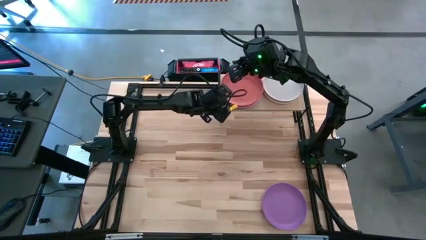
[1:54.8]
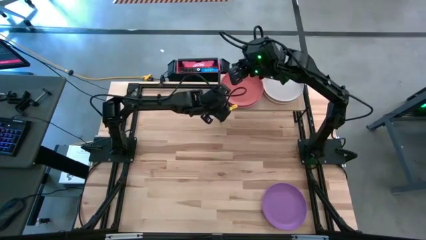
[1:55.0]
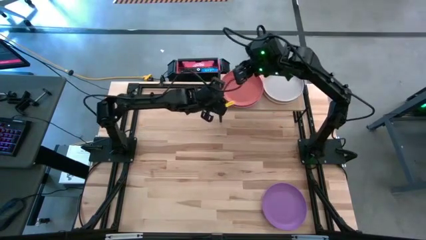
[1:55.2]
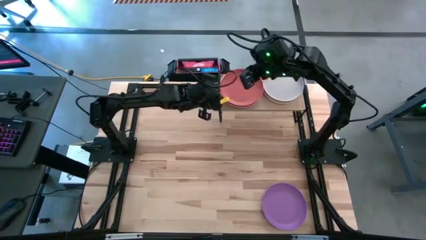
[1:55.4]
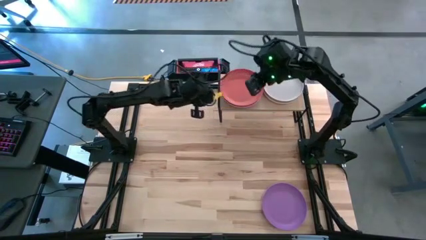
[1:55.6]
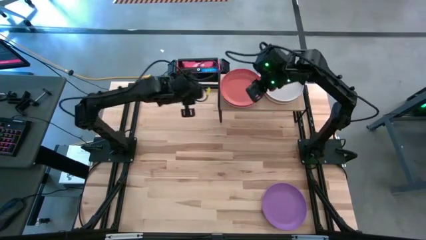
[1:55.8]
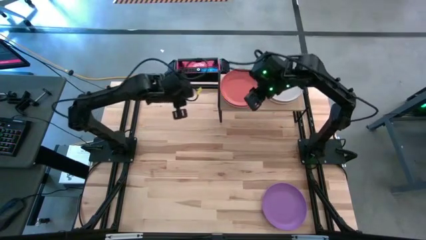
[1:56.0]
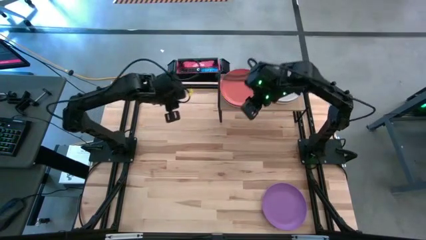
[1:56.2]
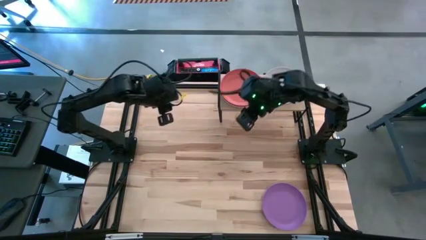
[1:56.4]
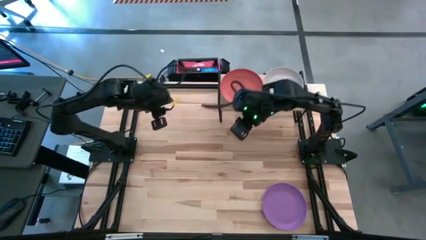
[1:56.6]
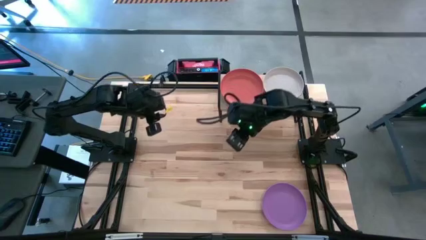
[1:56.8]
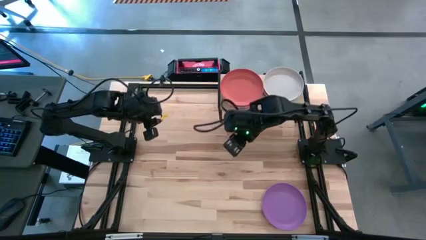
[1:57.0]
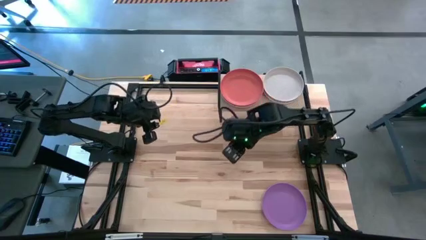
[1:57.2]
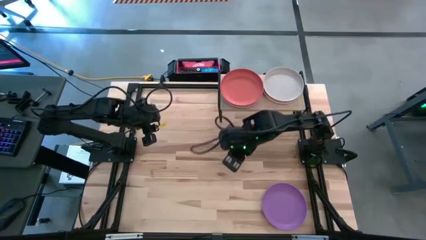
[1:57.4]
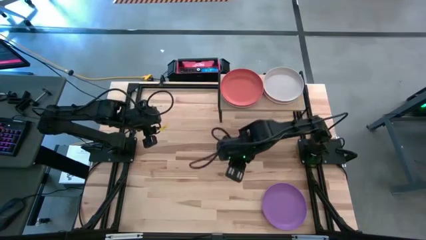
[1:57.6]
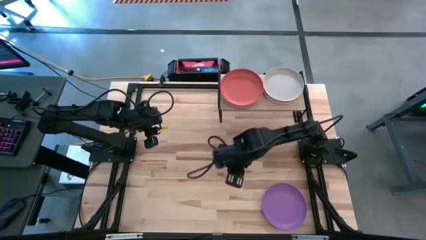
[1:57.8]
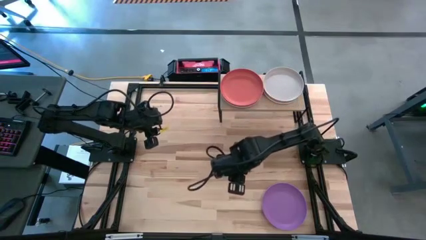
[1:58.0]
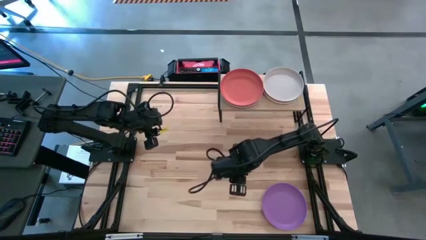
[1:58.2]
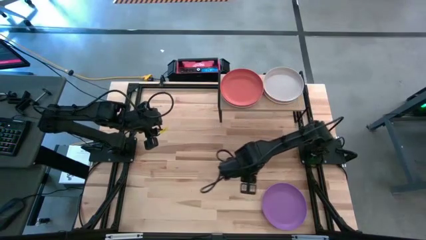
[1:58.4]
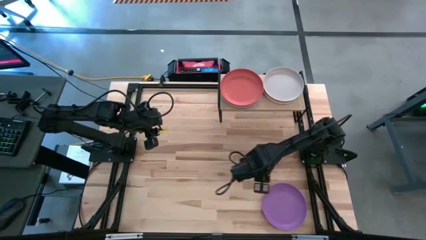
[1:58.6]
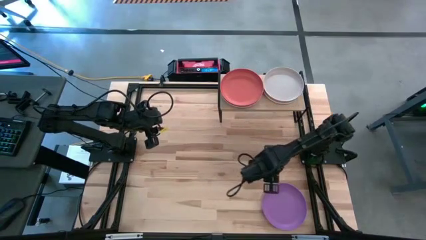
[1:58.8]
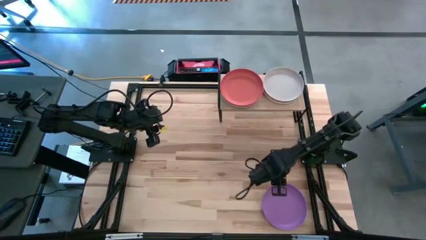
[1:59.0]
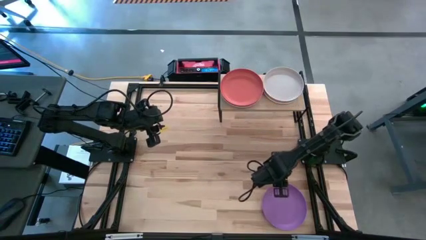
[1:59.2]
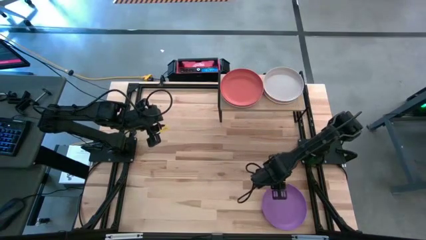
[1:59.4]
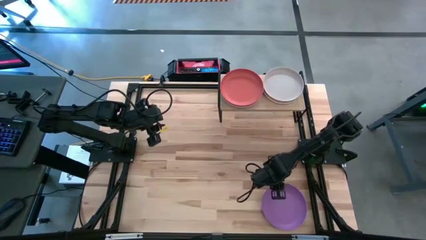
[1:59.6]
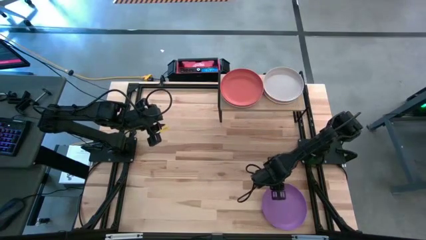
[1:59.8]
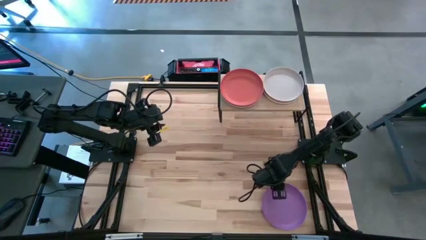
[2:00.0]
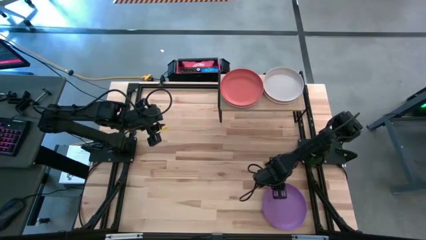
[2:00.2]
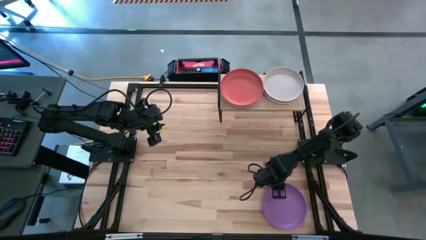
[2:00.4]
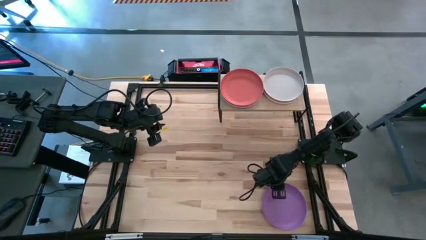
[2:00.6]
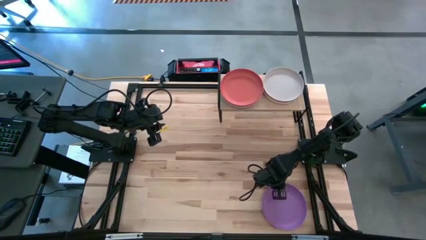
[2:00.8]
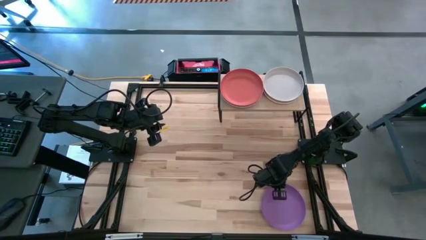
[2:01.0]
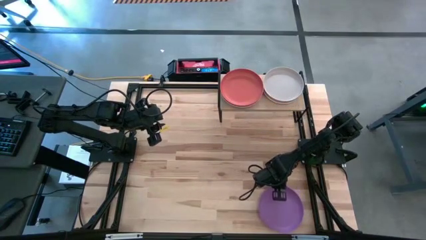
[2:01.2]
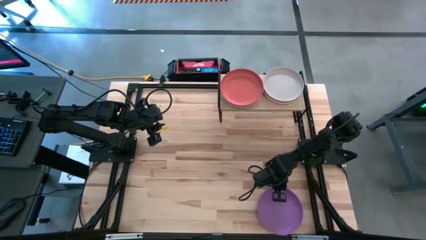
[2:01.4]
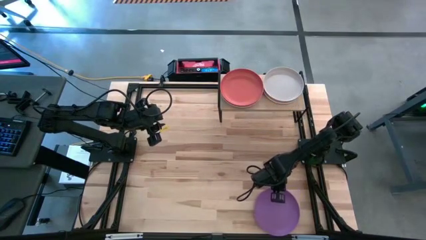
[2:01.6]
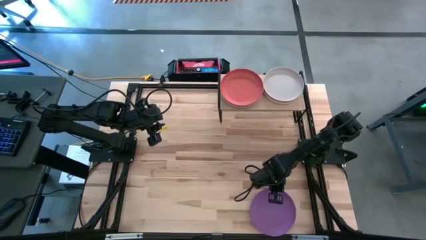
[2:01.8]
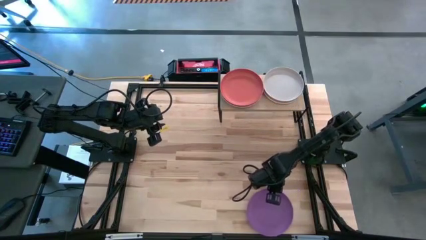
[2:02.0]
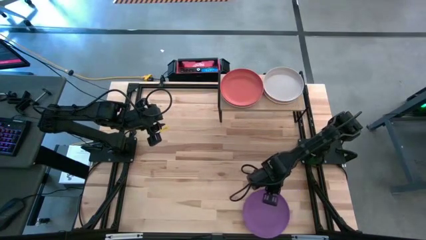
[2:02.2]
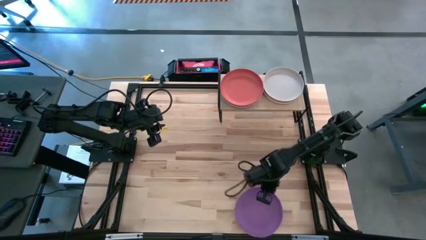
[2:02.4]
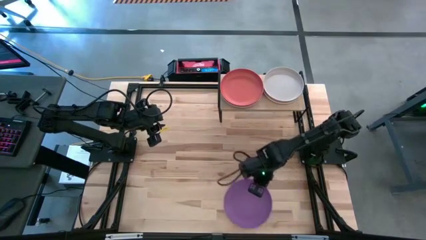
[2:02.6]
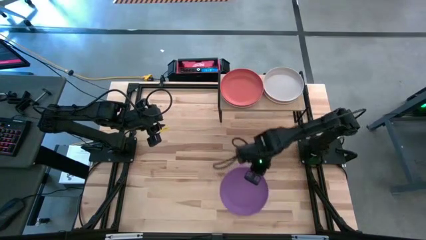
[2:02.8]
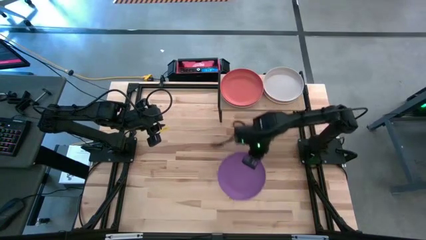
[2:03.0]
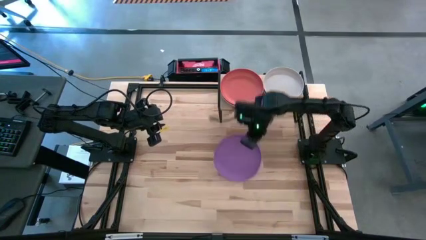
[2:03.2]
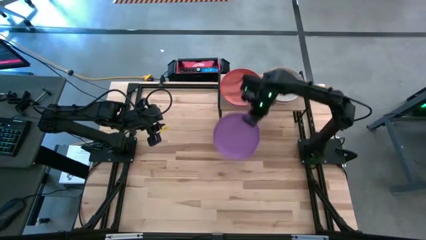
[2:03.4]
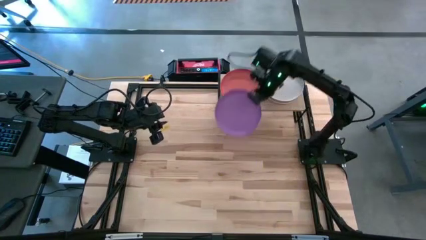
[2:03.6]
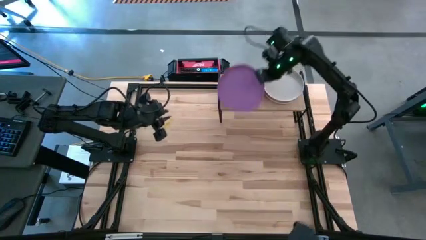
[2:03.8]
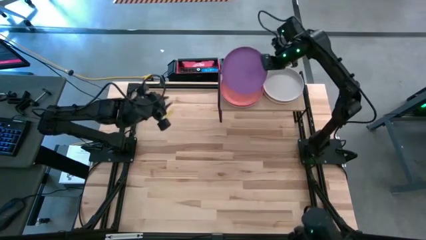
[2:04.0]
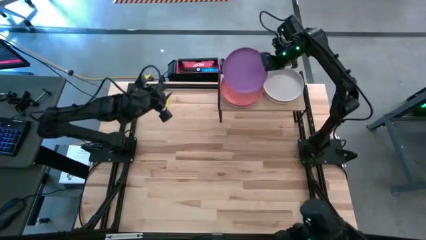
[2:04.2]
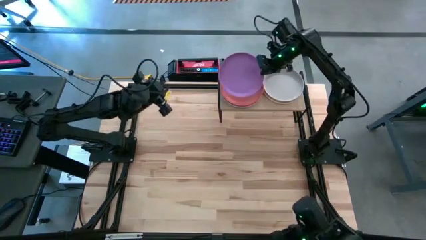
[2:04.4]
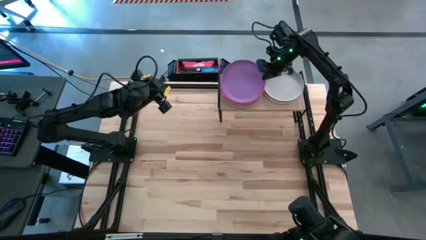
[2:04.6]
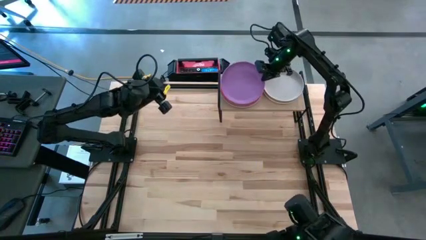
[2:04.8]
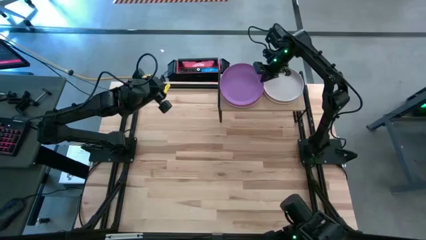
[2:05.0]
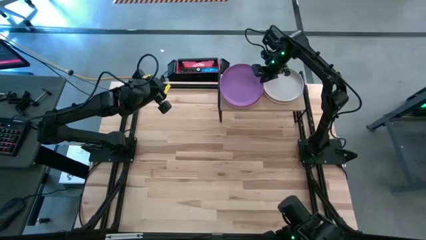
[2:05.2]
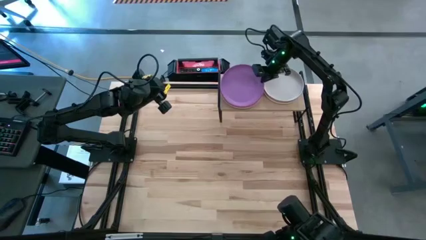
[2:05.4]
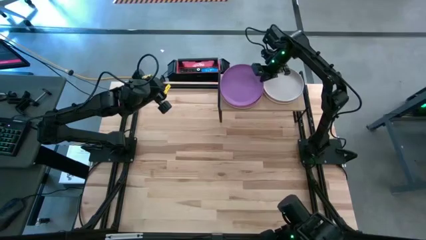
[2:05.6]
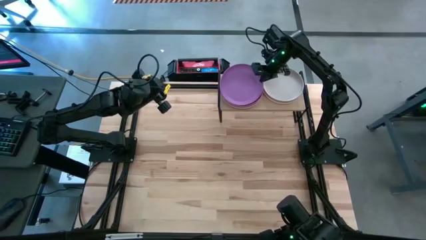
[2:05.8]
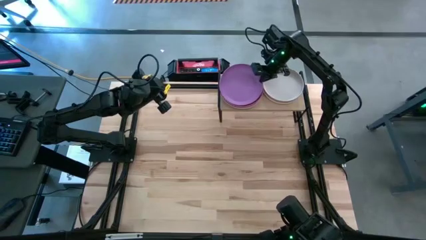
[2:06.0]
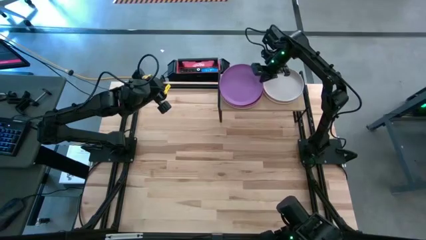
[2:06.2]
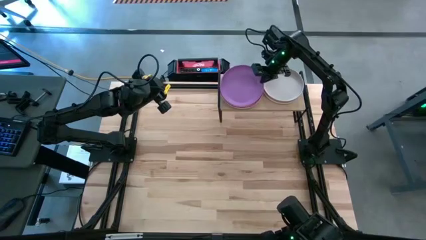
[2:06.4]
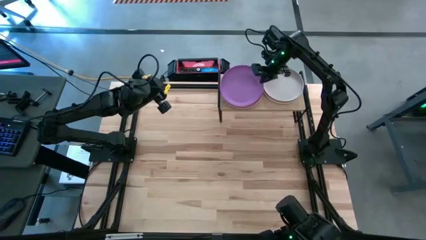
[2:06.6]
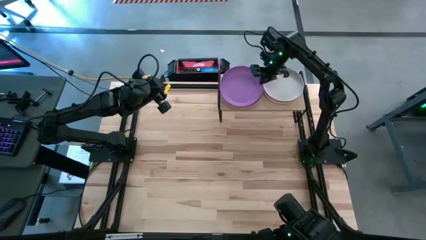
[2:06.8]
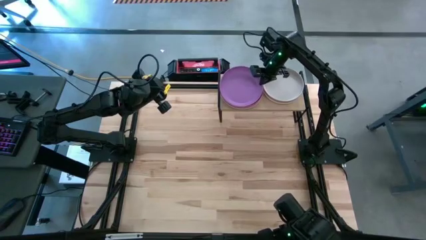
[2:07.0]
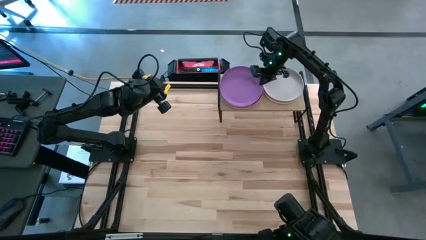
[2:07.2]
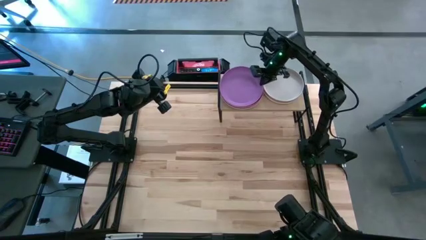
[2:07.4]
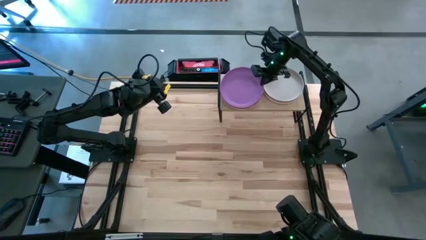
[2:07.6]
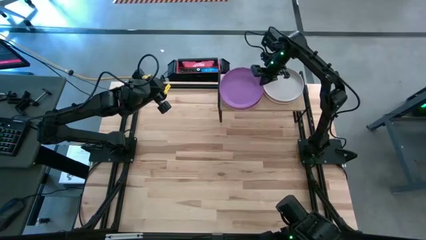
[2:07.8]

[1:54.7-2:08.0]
Task: Place and stack plates onto a shelf
Stack the purple plate on top of the orange plate on the shelf

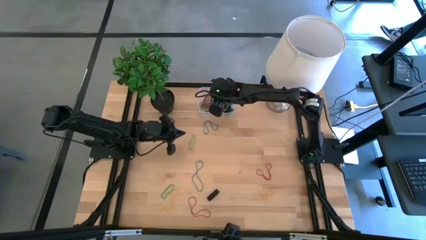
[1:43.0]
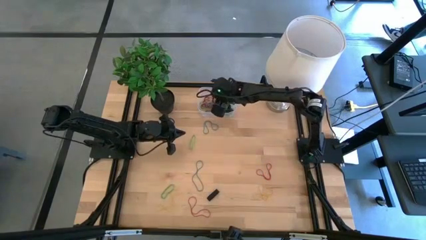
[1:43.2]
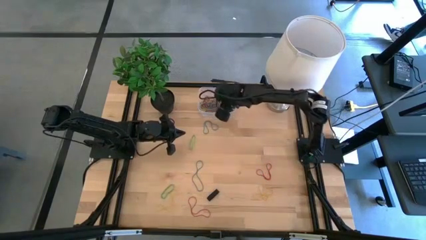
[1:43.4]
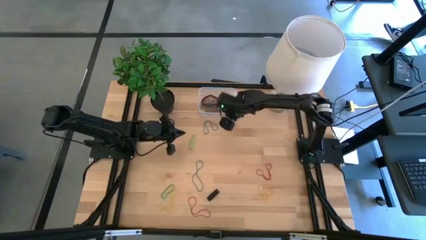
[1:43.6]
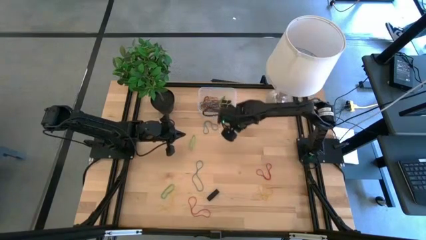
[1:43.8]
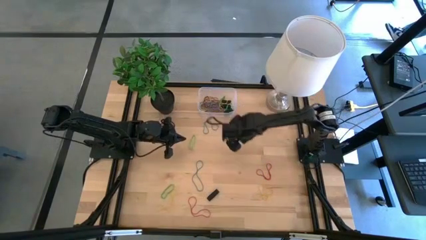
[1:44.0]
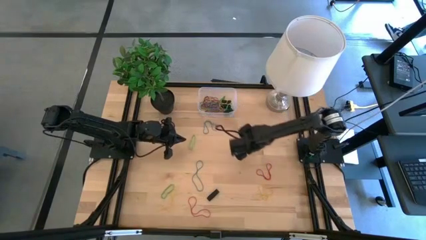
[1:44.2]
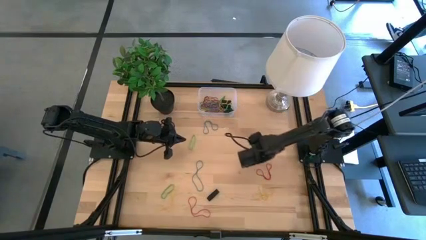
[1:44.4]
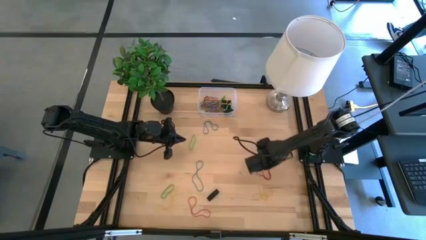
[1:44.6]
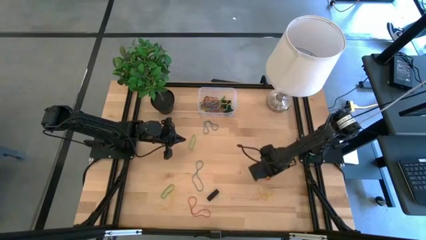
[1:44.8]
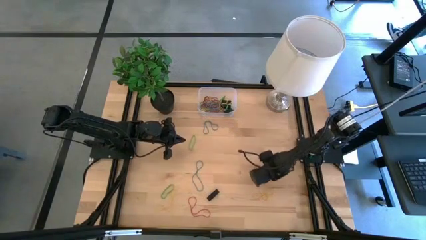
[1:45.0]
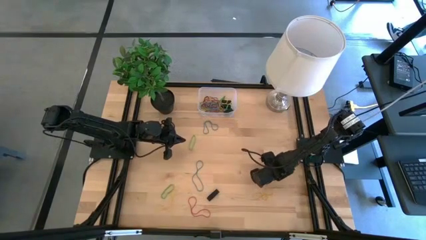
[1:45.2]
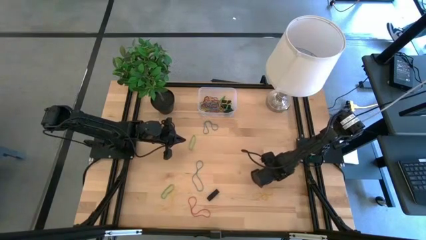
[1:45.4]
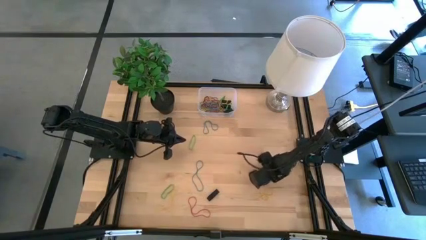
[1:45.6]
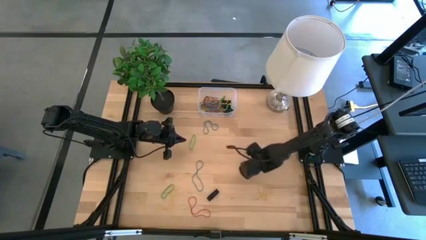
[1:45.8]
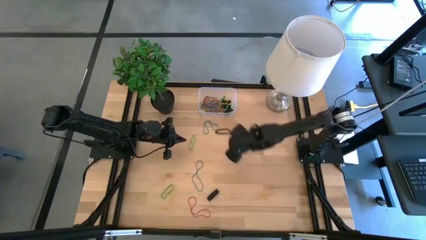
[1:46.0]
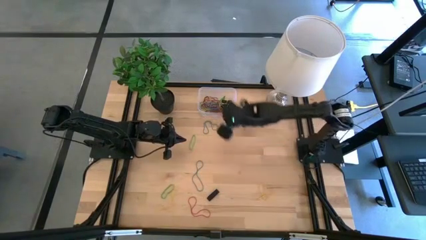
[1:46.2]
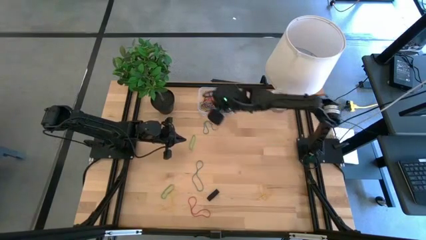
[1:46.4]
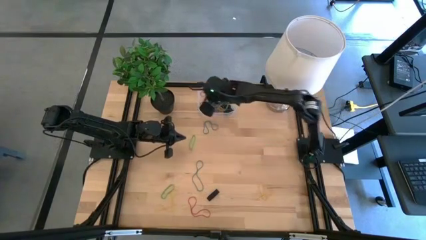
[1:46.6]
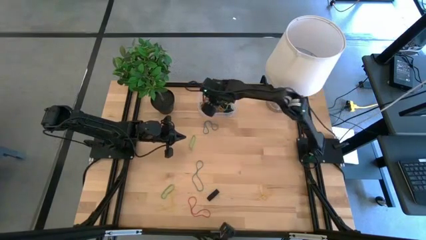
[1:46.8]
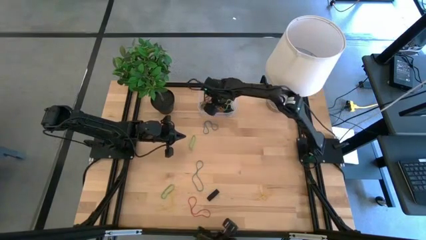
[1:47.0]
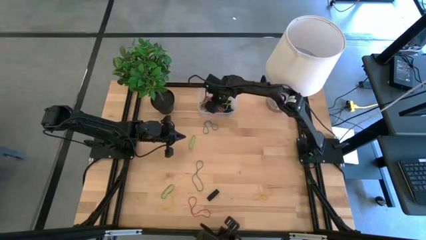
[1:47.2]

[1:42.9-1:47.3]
Task: Pick and place rubber bands into bin
Put the red rubber band into the transparent bin
